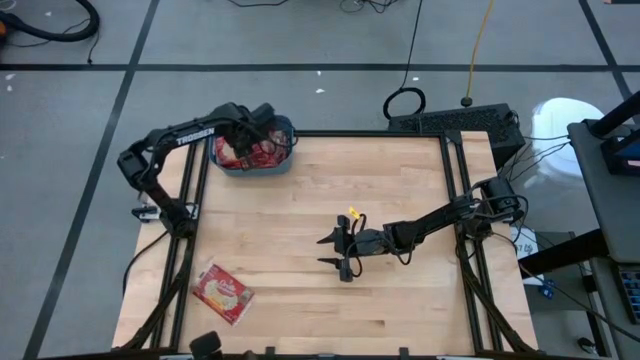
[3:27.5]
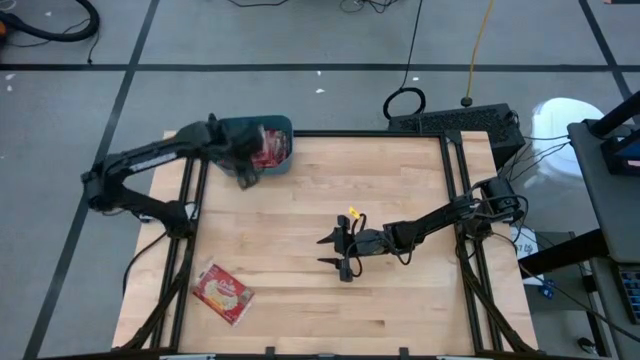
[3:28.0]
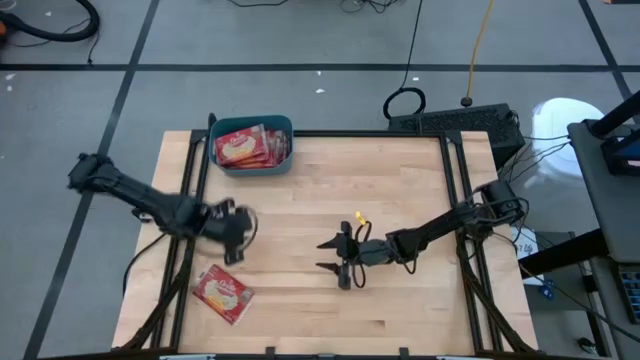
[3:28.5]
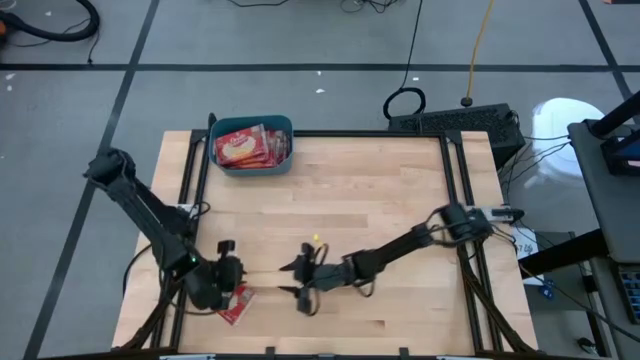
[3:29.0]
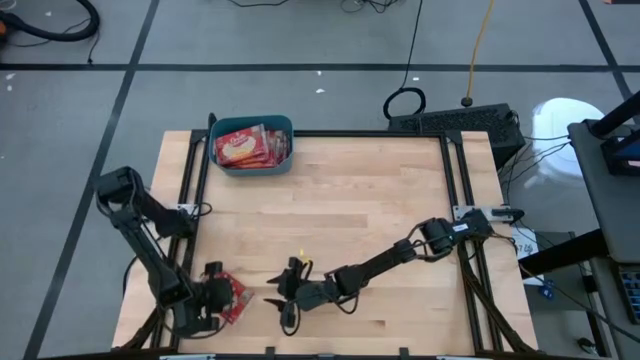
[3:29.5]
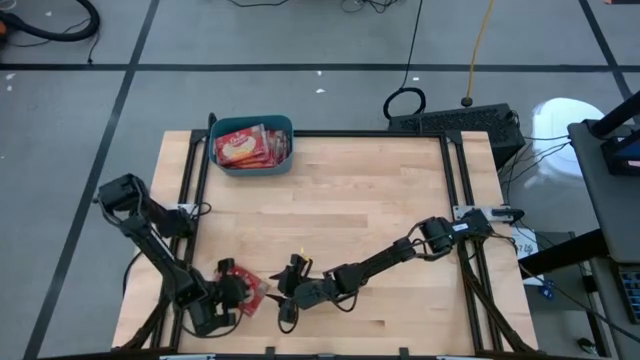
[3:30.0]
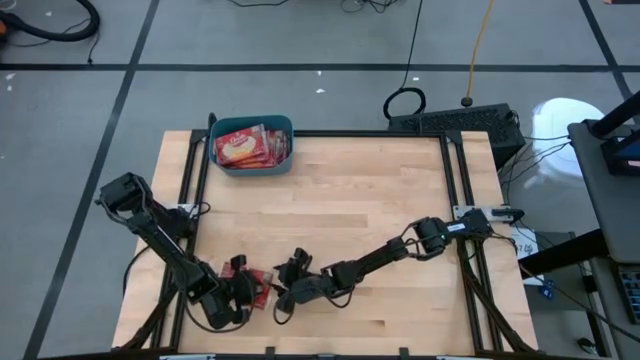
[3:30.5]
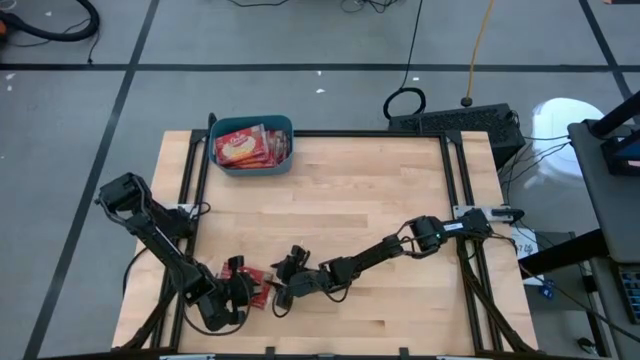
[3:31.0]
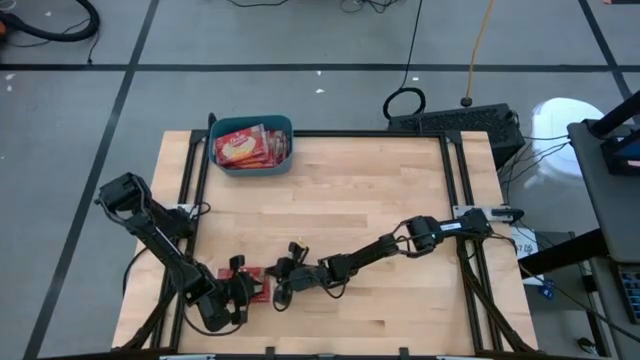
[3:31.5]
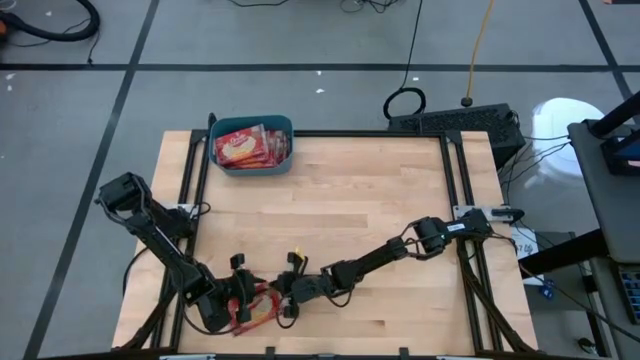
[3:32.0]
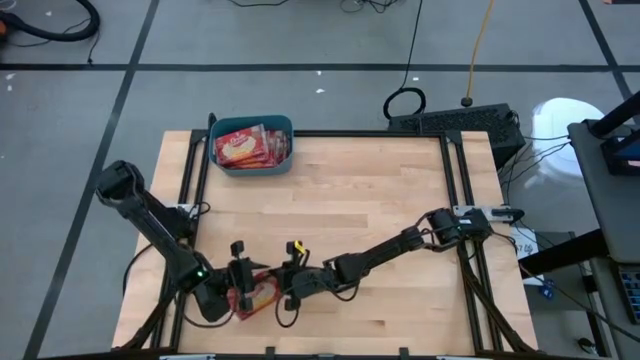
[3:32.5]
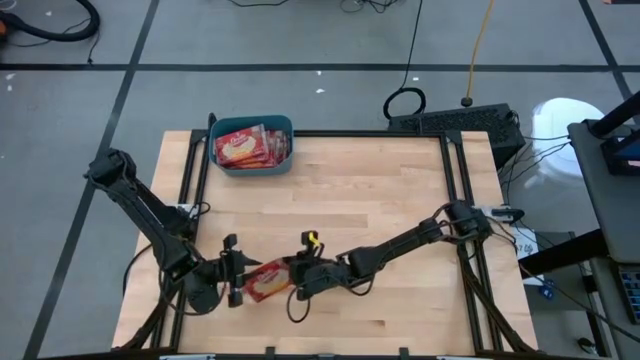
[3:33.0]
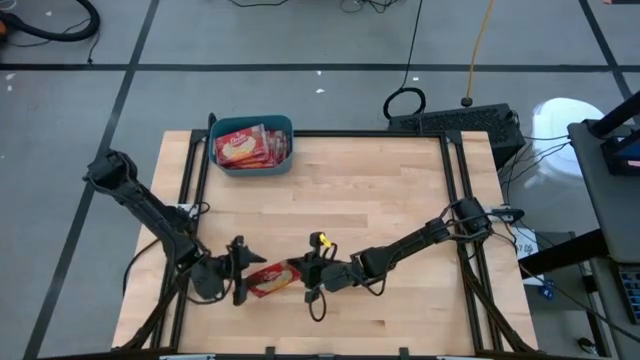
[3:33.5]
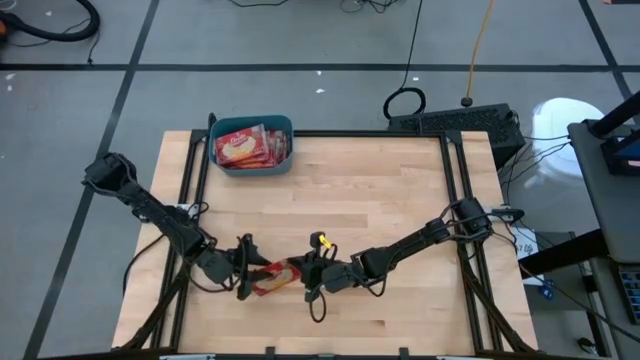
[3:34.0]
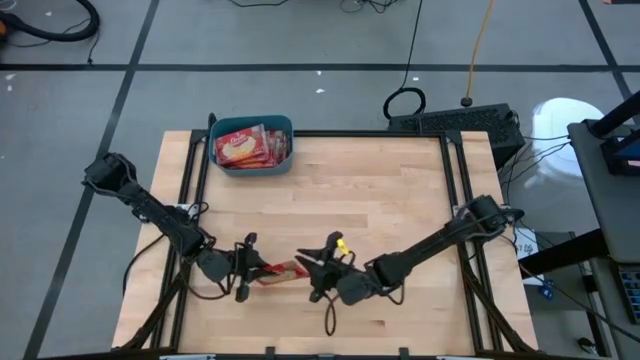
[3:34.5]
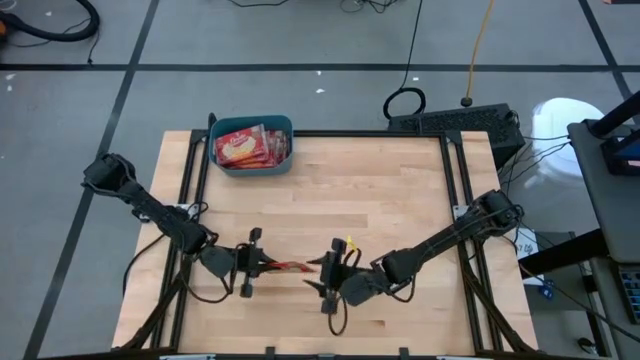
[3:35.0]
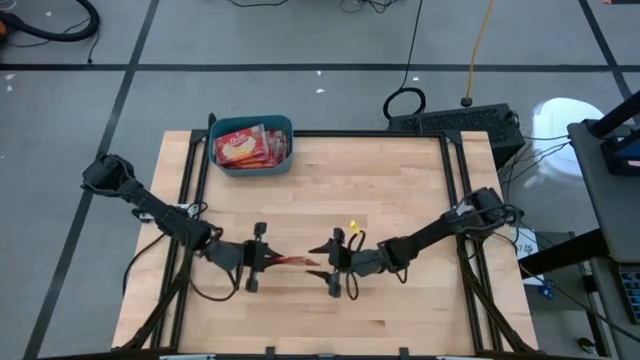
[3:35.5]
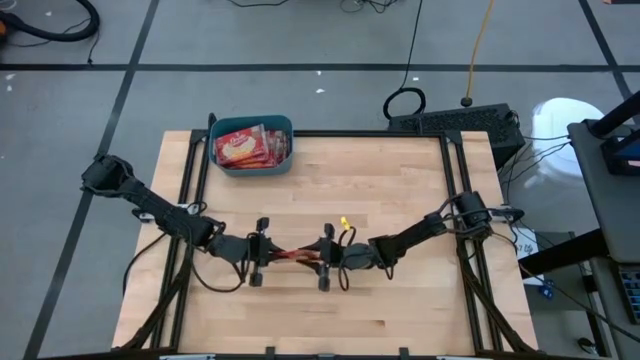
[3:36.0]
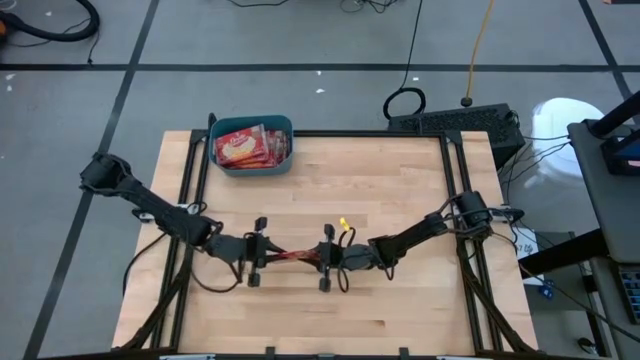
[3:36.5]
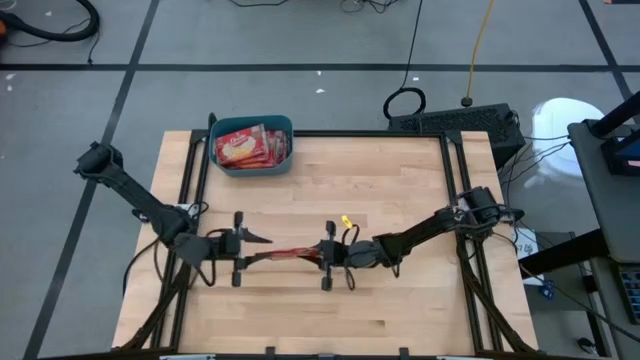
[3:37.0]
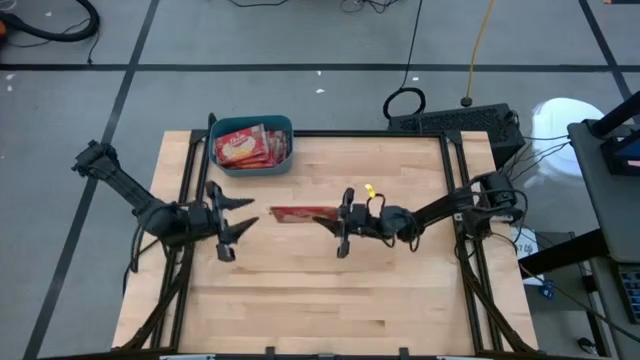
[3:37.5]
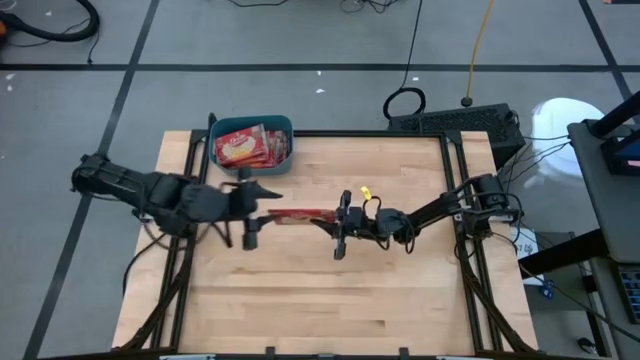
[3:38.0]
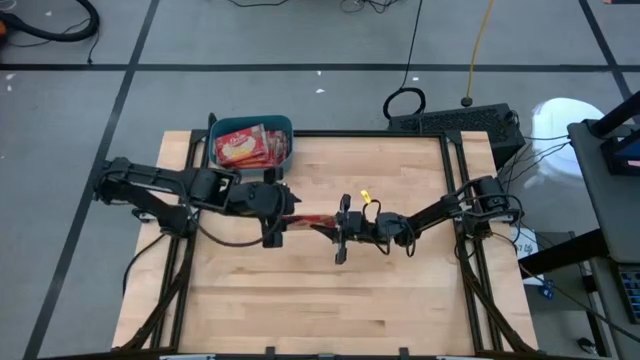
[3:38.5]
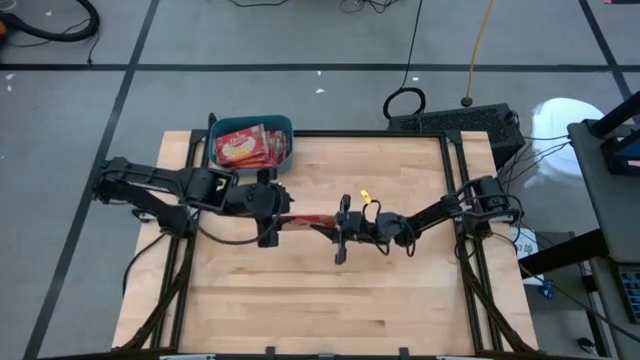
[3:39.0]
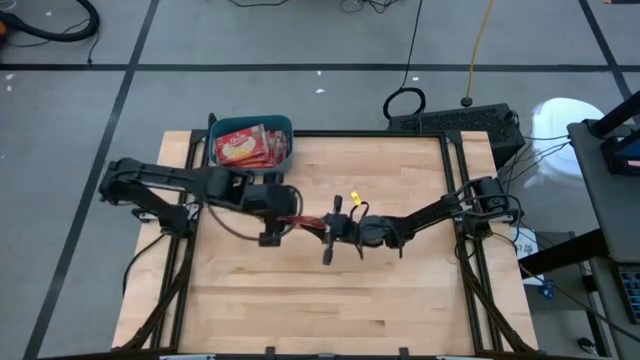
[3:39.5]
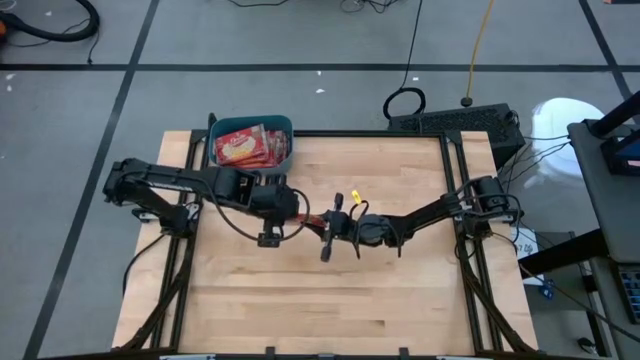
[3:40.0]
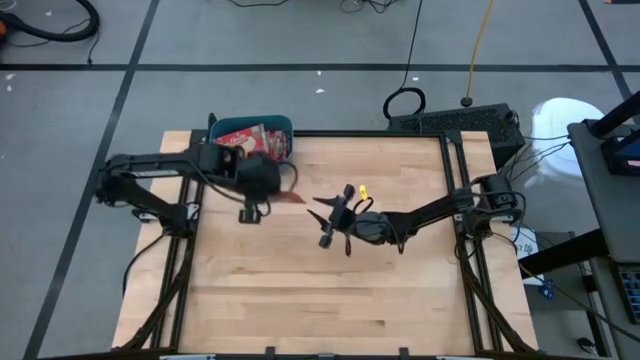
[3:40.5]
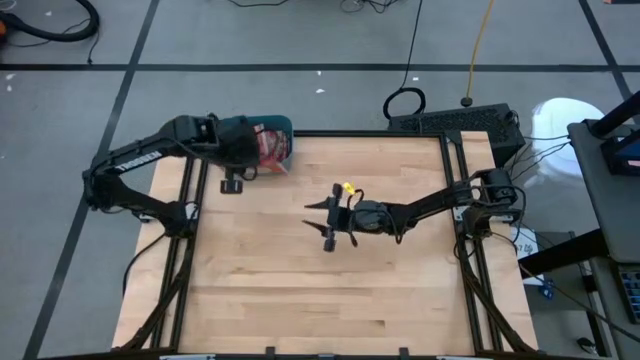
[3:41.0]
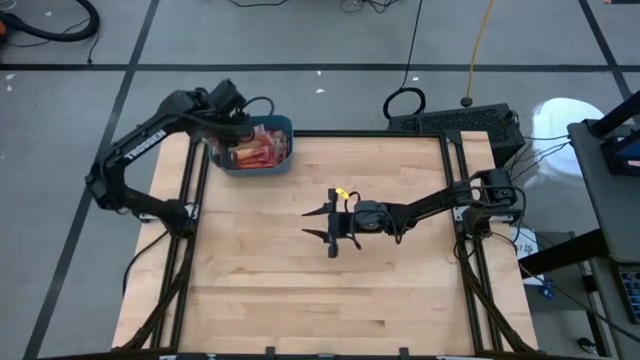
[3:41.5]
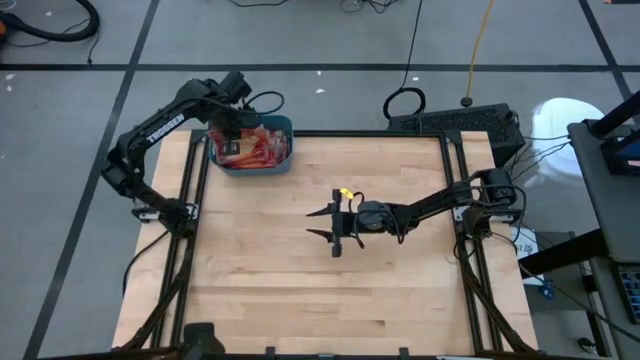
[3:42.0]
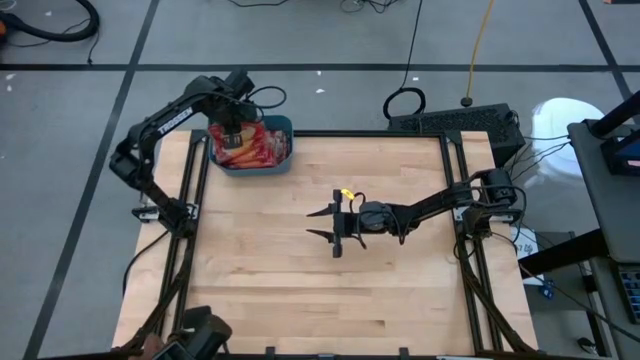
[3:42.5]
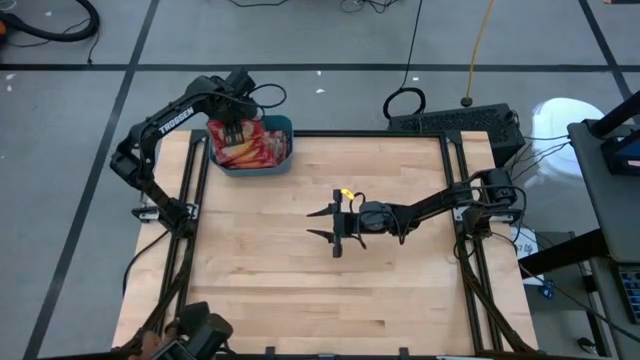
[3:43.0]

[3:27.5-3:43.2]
Task: Sort popcorn bags into baskets
Put the red popcorn bag into the blue bin

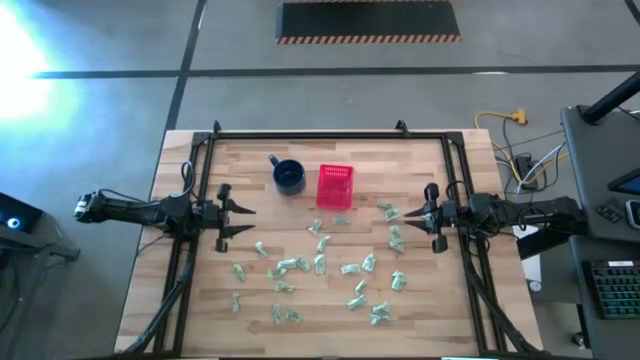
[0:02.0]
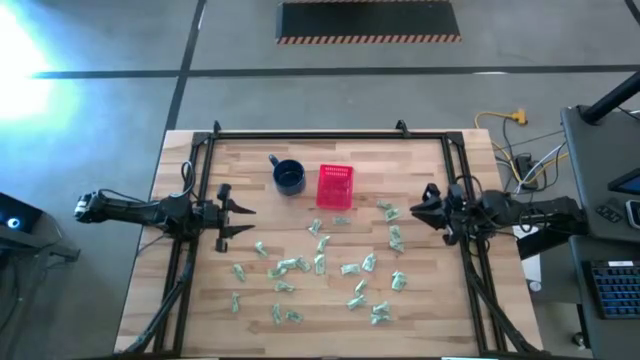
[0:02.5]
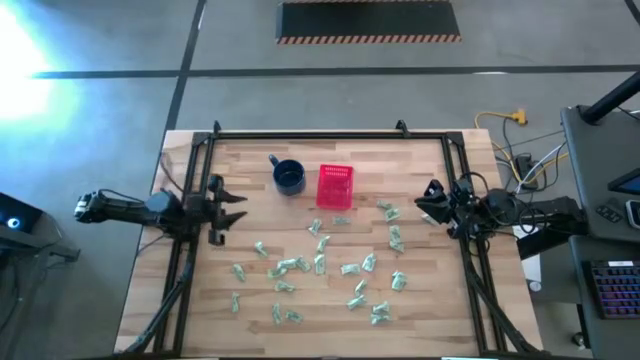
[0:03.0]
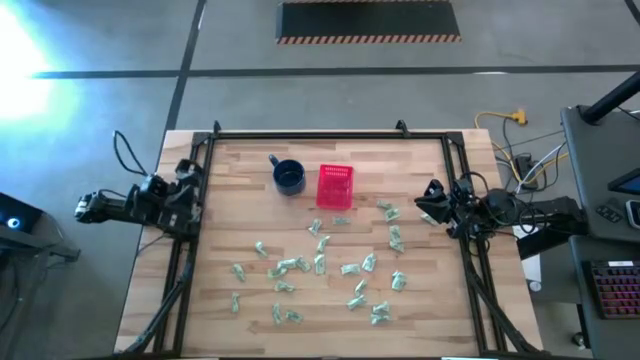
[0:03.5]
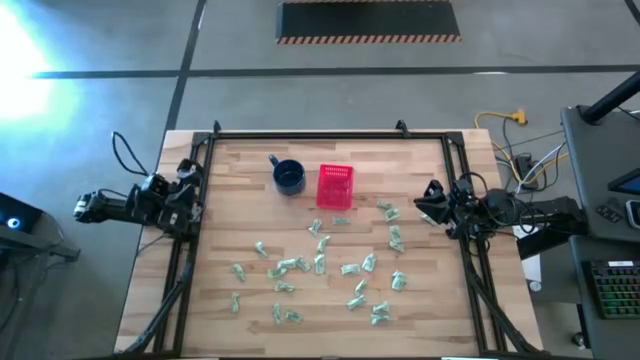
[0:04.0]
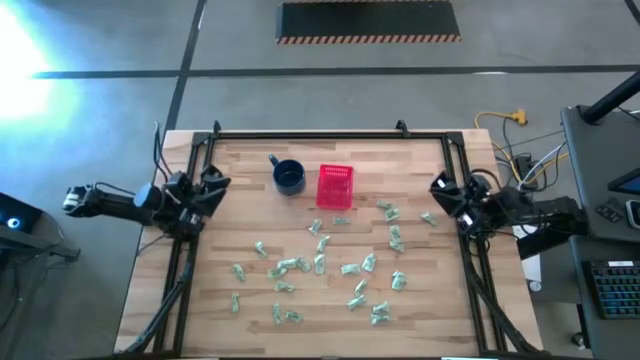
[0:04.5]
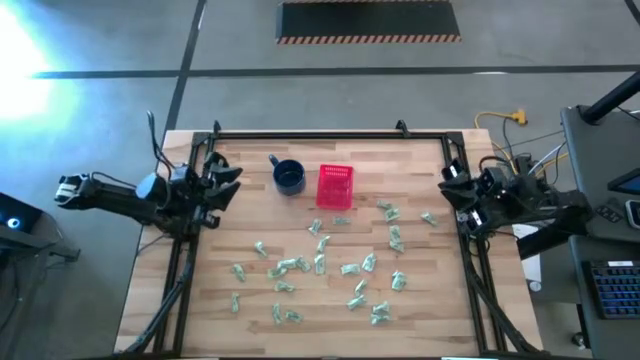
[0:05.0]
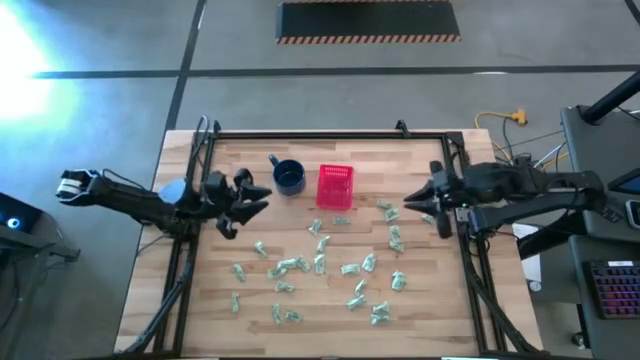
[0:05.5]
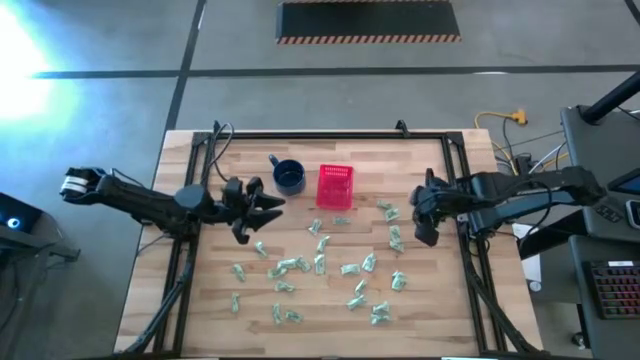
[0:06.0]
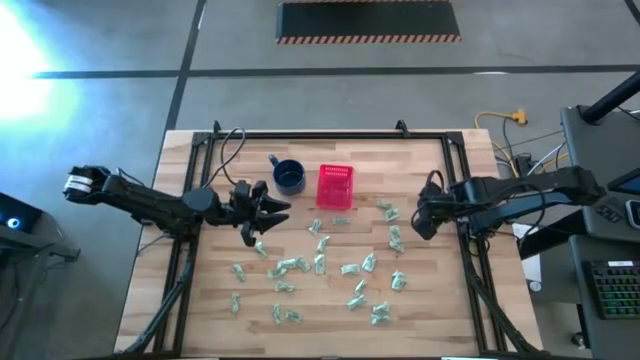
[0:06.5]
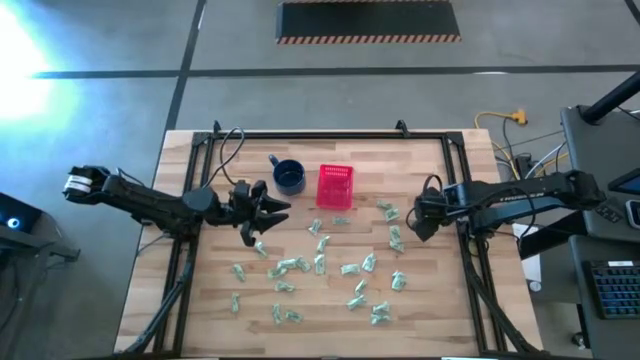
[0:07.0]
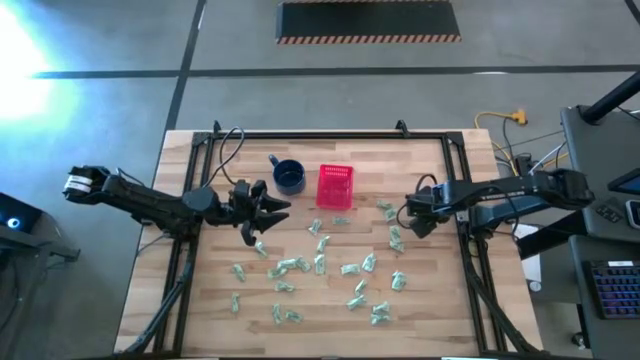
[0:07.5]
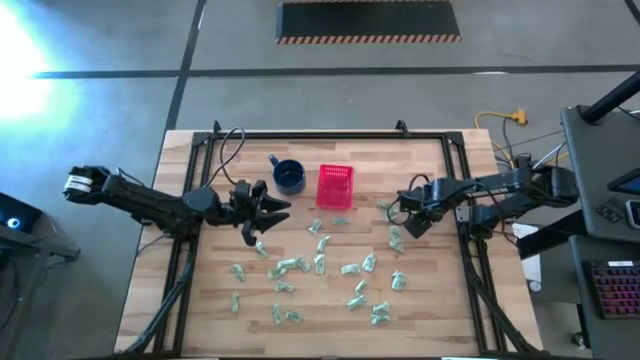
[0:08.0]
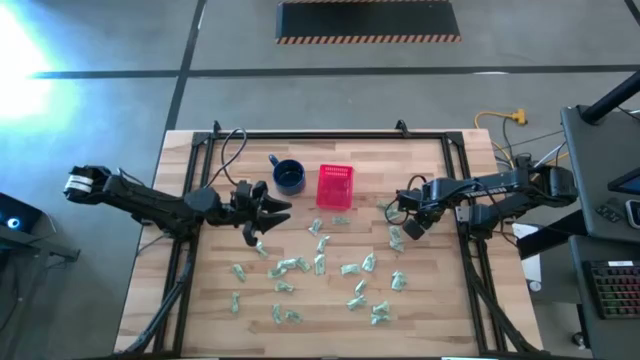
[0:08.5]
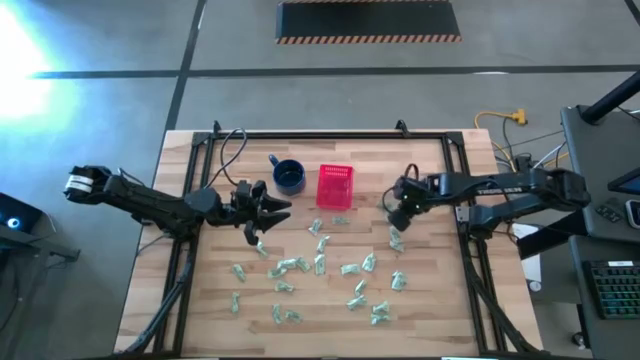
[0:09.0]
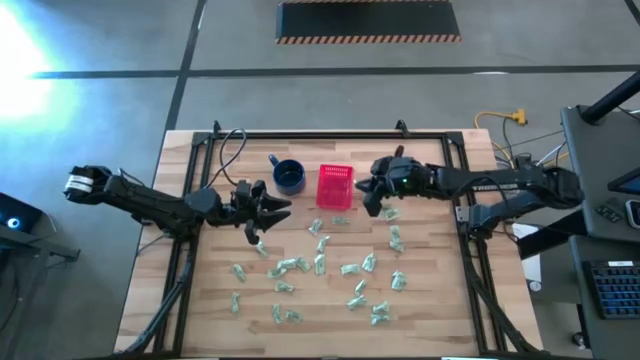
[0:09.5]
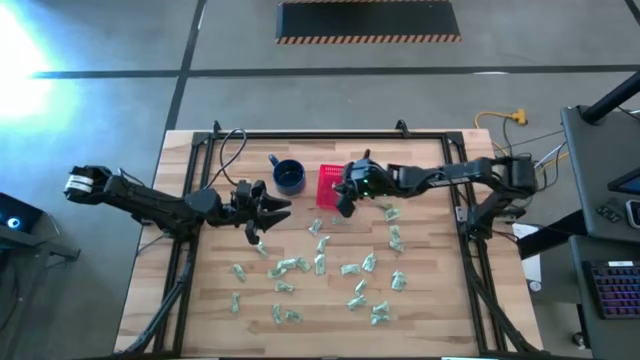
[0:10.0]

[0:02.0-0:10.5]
Task: Pick and place Stevia / Truvia into bins
Put the stevia packet into the basket
